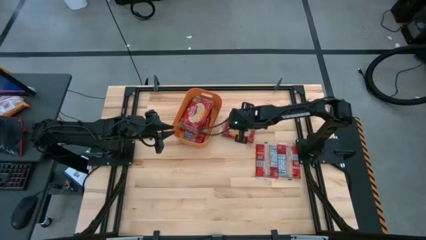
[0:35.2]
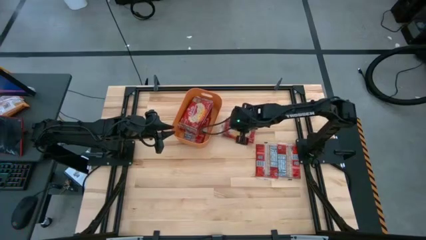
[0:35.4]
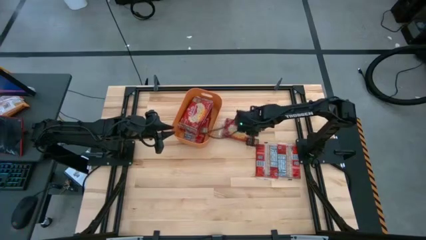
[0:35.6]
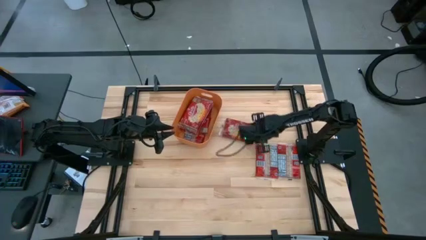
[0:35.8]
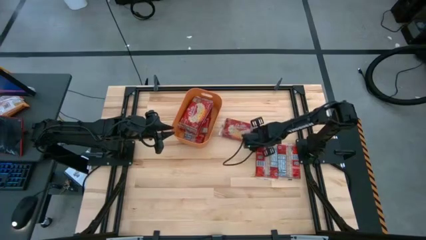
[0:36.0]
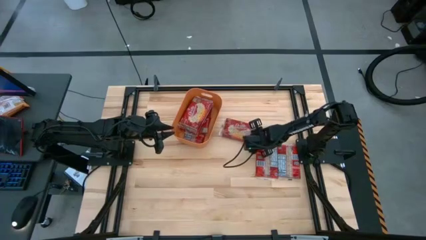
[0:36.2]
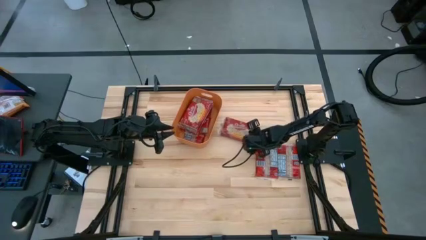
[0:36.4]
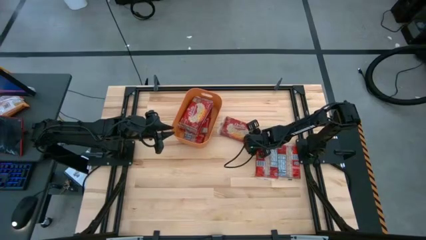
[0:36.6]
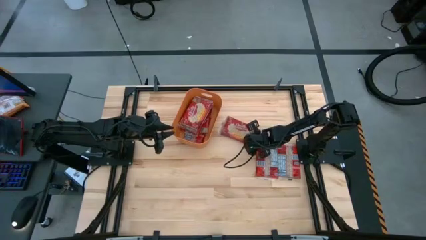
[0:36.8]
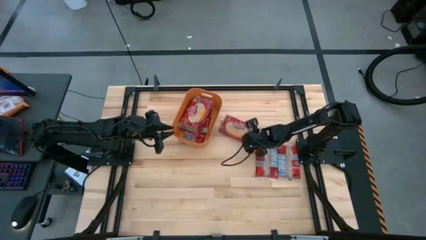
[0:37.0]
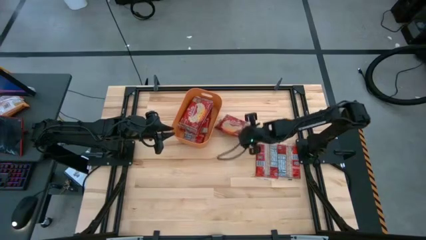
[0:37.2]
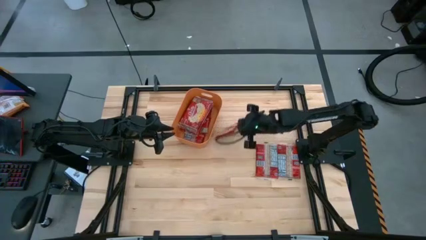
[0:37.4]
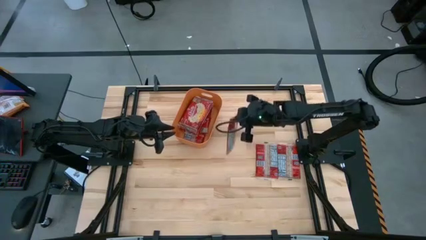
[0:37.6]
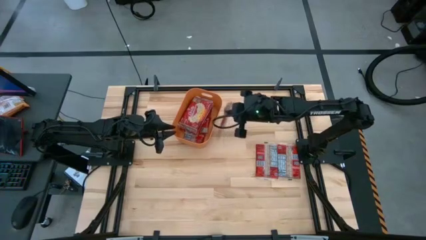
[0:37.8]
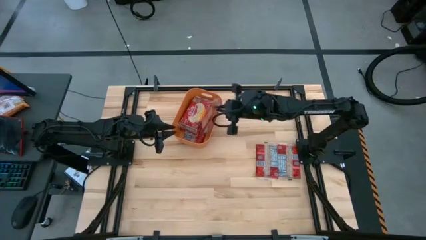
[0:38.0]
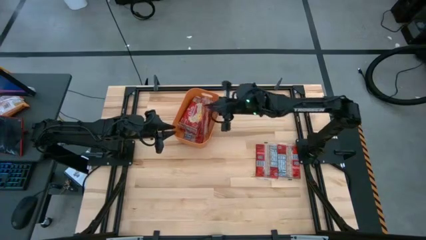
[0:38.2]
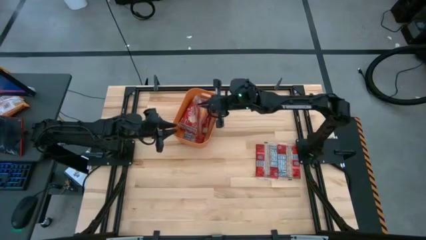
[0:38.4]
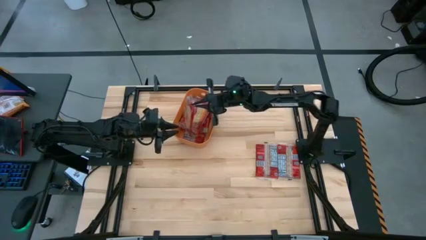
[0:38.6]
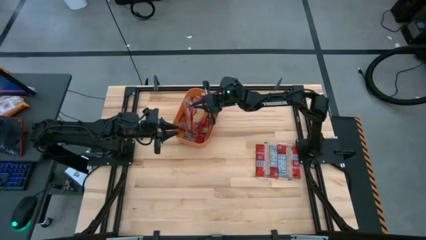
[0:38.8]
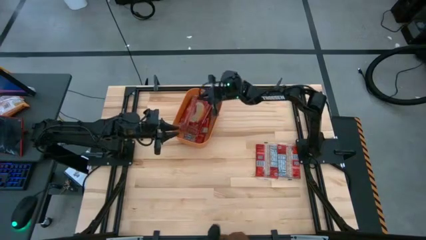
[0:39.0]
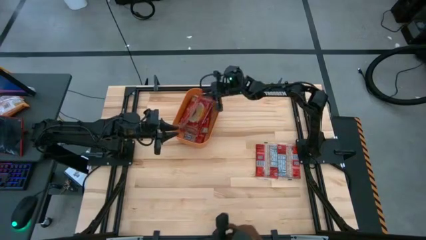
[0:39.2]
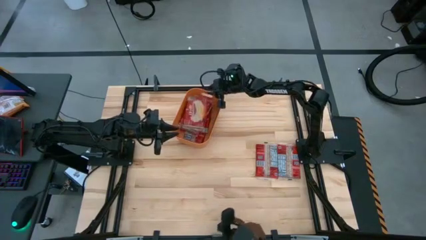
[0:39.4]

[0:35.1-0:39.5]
Task: Sort popcorn bags into baskets
Put the red popcorn pack into the orange bin

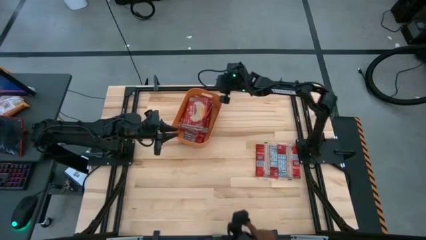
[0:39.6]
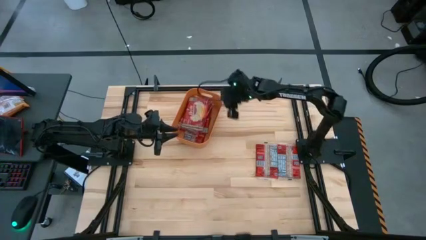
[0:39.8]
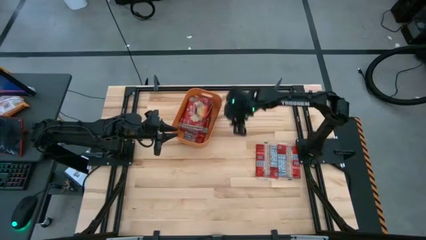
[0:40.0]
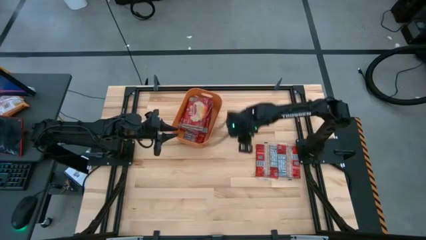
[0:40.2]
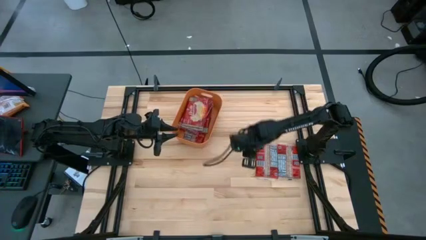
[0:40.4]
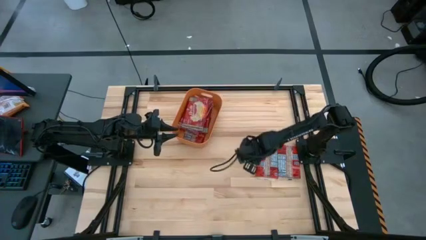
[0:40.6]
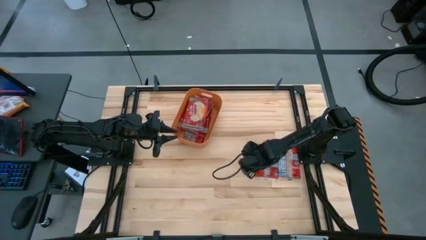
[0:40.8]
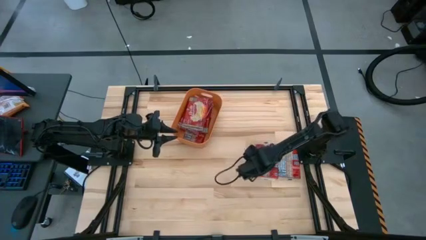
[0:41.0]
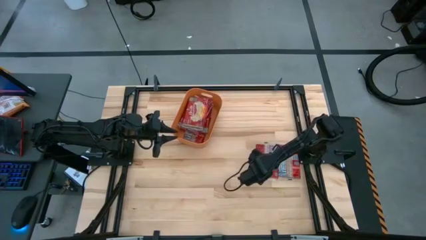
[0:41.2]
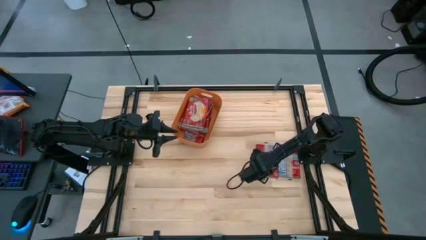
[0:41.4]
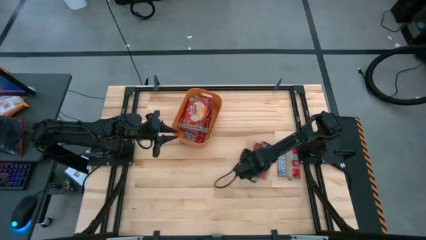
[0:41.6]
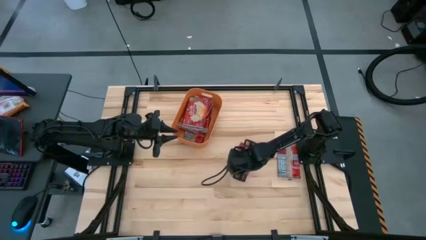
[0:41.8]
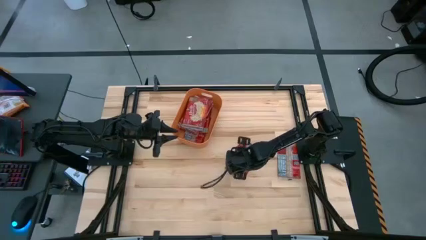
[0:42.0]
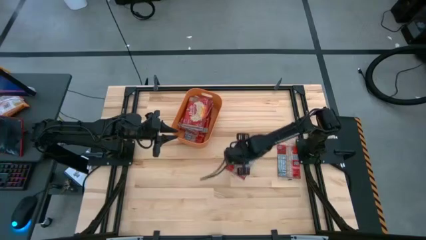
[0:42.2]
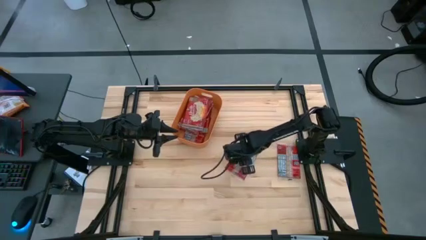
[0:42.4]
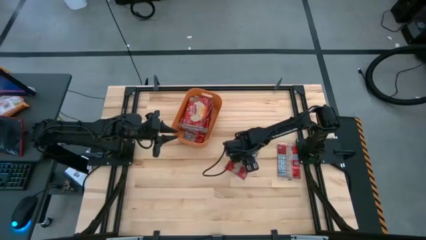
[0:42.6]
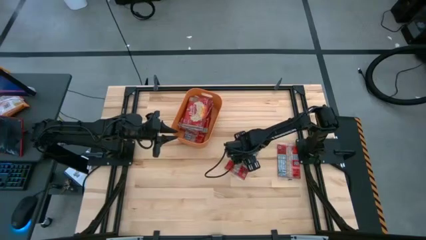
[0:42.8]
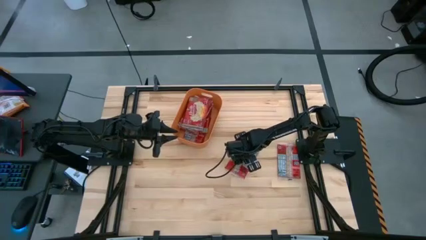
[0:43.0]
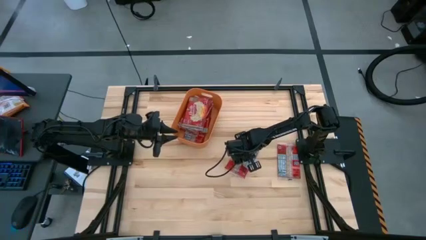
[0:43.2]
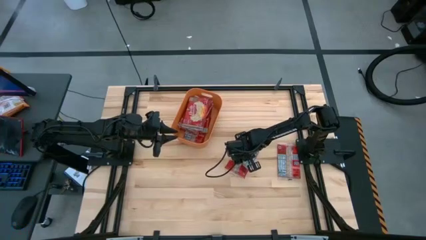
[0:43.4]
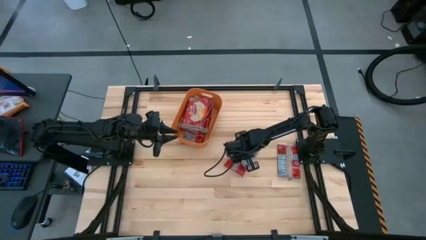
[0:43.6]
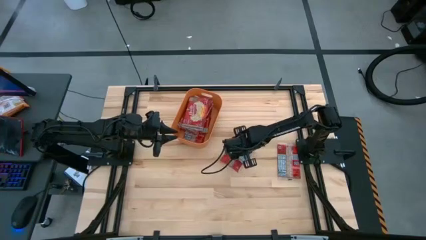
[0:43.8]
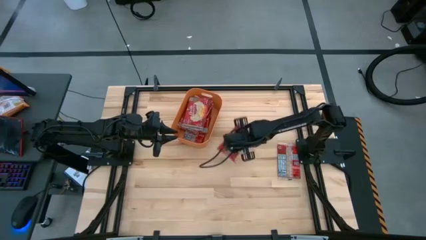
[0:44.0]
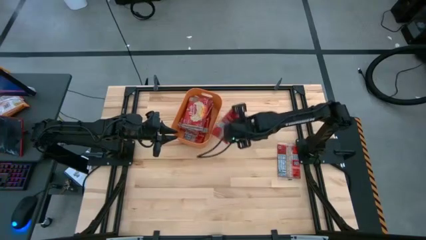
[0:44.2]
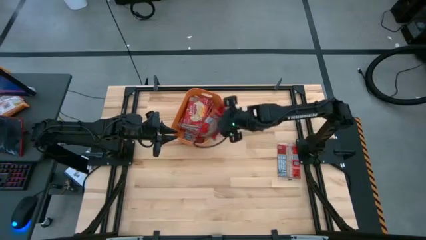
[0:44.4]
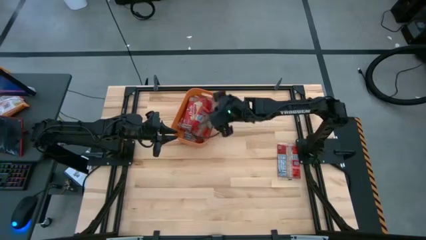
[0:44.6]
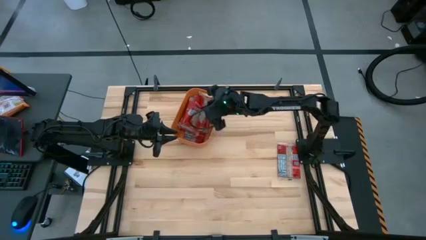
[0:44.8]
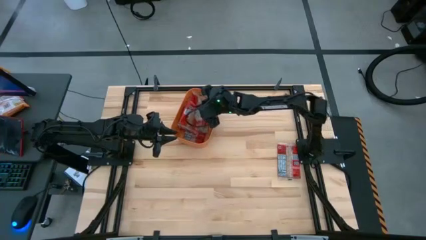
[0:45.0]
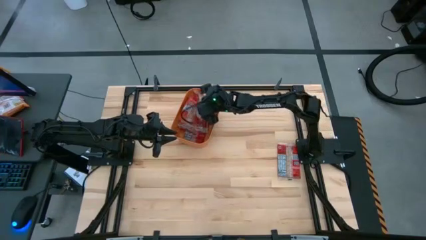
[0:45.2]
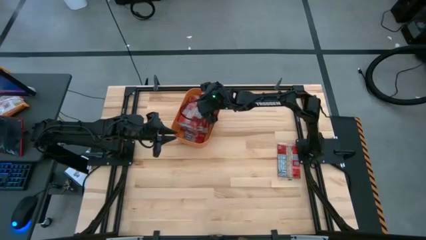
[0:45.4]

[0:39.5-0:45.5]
Put the red popcorn pack into the orange bin

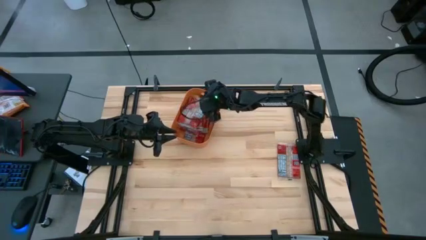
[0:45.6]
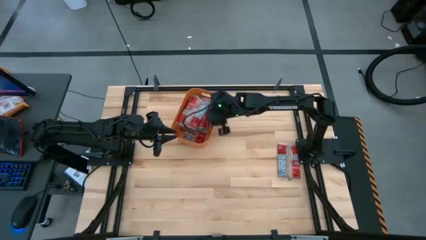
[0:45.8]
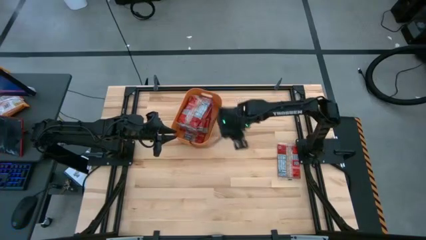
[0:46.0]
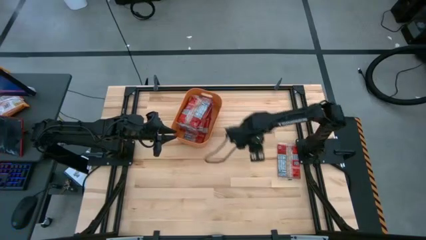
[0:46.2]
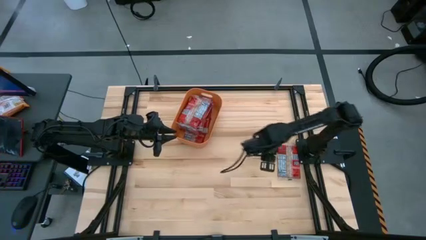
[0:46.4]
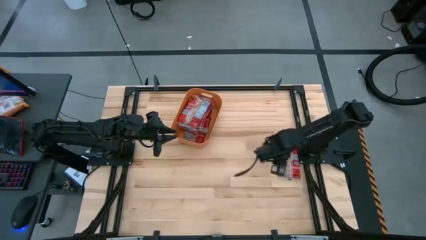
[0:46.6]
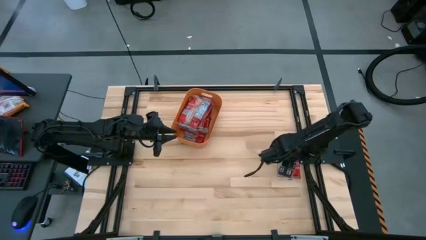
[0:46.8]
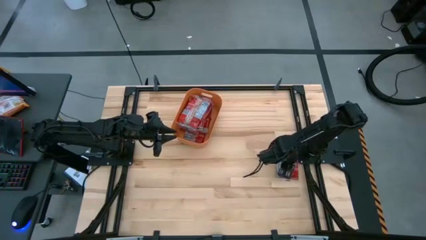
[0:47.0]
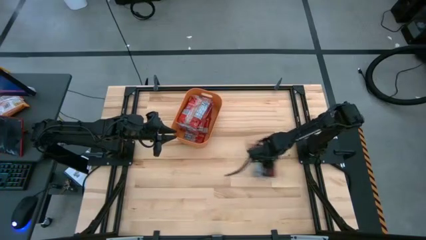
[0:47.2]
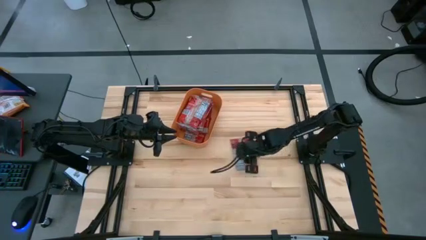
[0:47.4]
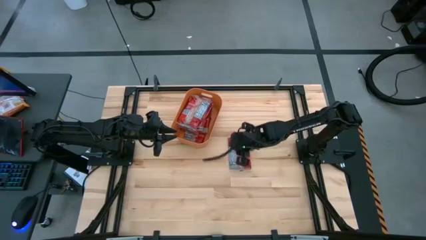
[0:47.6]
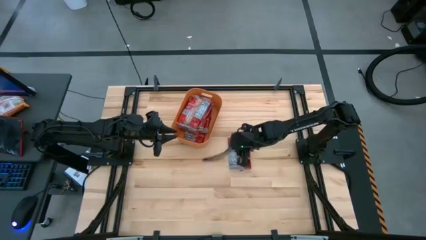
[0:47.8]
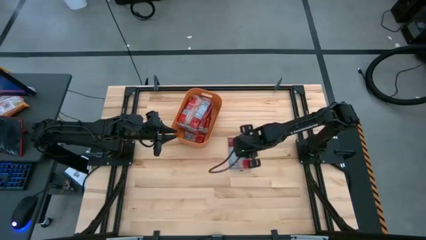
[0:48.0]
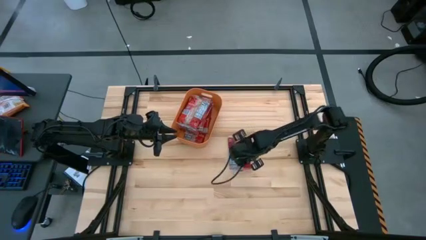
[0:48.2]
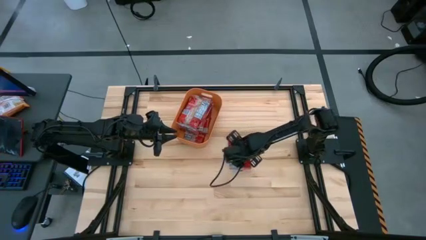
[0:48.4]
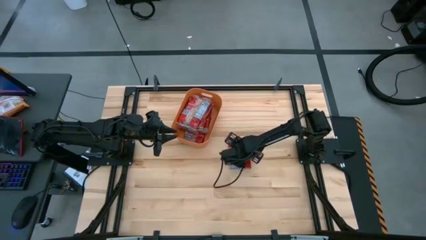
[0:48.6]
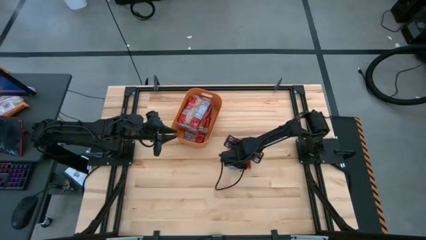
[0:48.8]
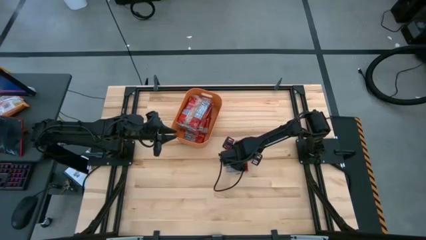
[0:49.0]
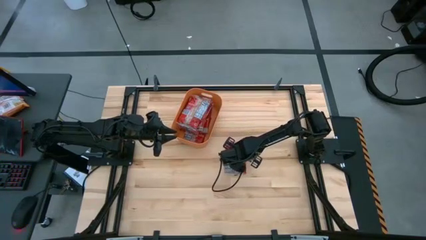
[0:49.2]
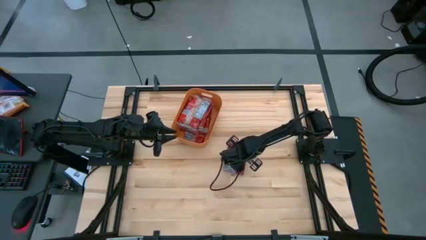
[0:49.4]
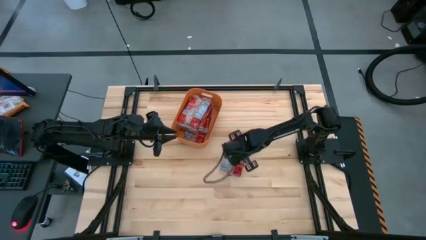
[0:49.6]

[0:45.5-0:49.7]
Put the red popcorn pack into the orange bin

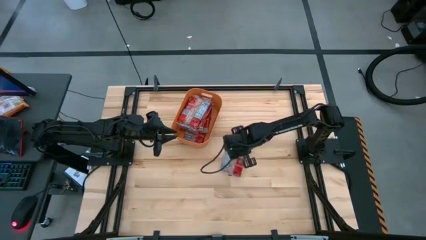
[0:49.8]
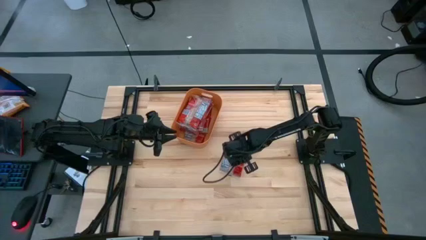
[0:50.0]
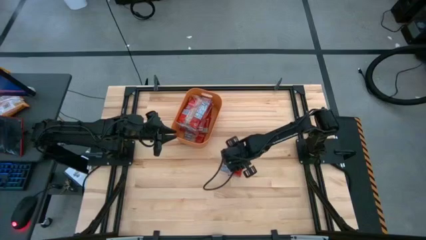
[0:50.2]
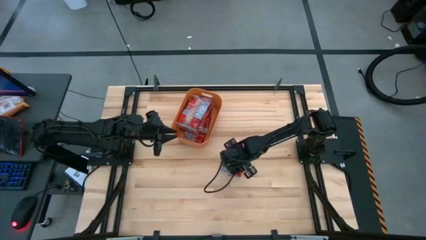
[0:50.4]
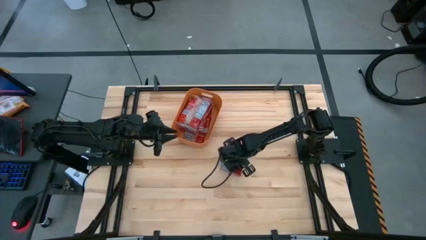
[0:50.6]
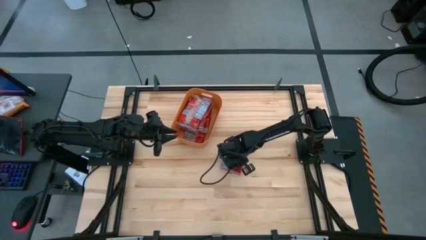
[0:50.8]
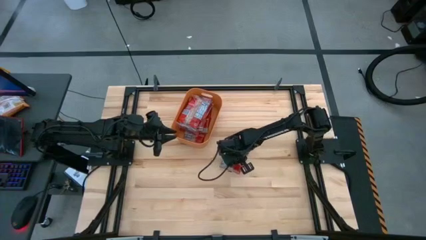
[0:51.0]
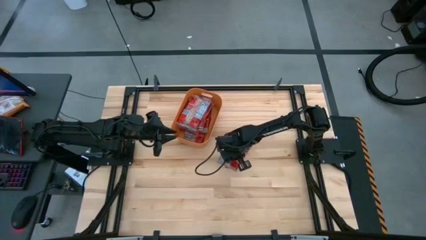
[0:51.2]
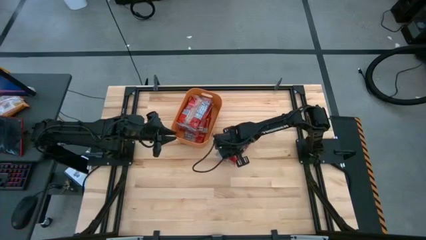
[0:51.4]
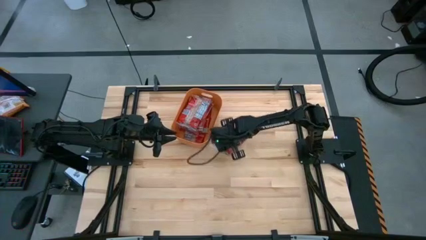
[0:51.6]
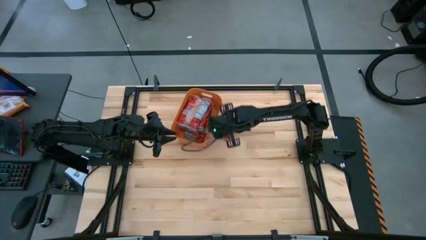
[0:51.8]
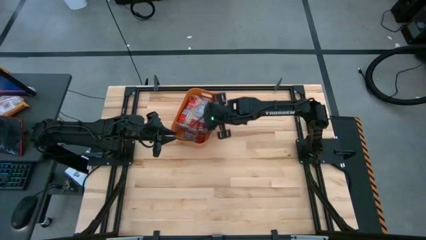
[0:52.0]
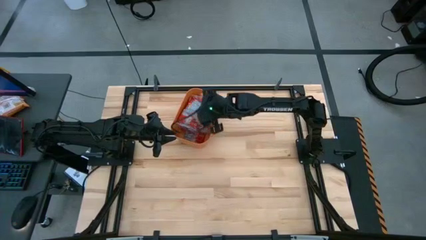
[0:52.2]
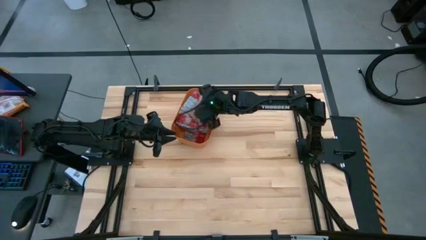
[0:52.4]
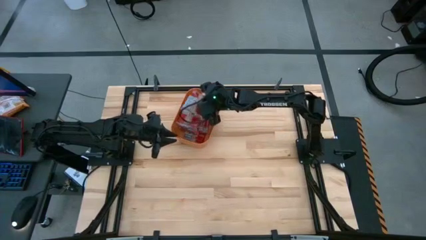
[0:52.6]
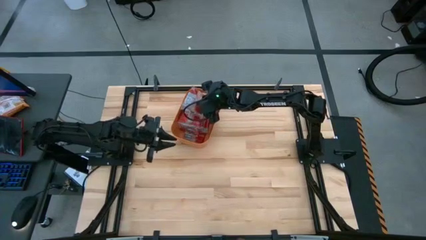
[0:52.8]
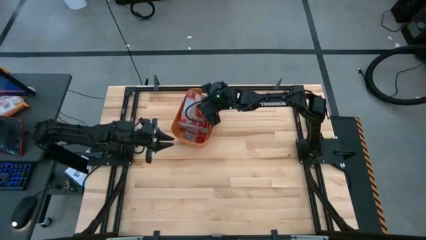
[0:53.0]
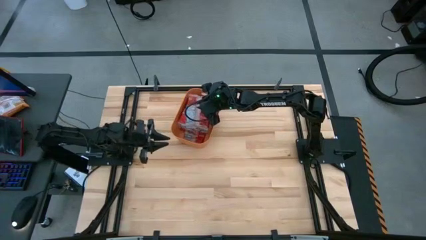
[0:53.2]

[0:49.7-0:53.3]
Put the red popcorn pack into the orange bin
